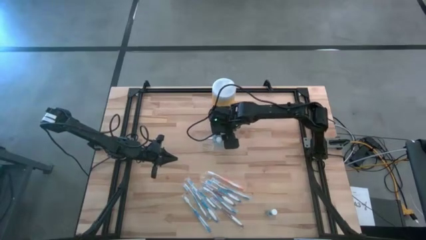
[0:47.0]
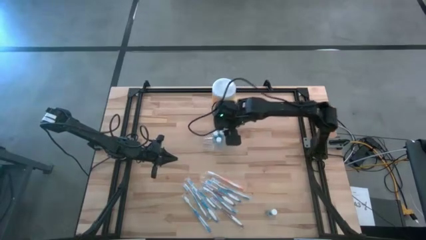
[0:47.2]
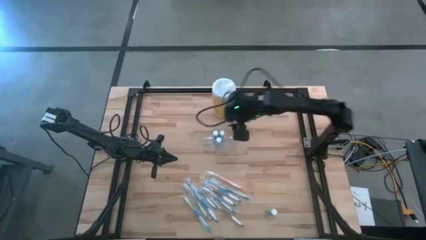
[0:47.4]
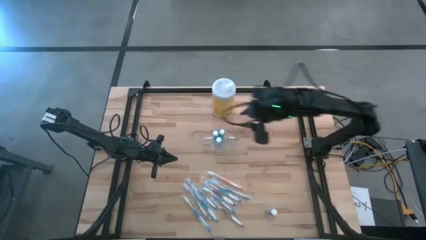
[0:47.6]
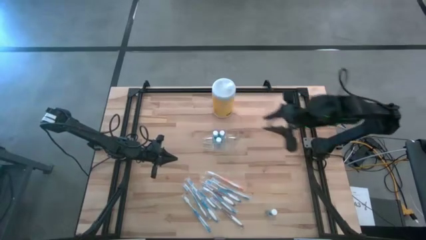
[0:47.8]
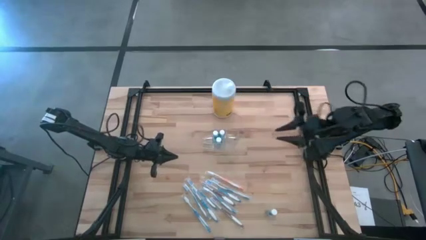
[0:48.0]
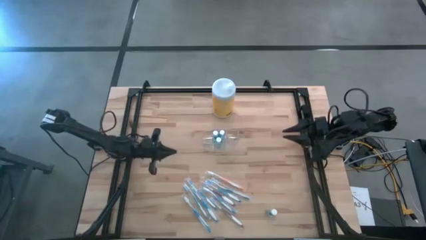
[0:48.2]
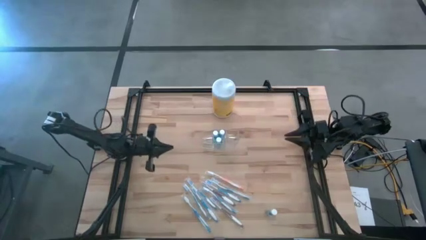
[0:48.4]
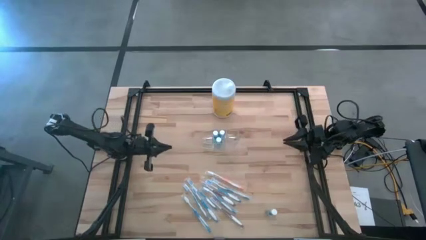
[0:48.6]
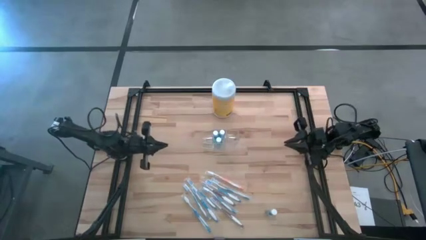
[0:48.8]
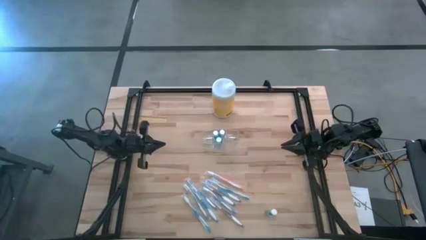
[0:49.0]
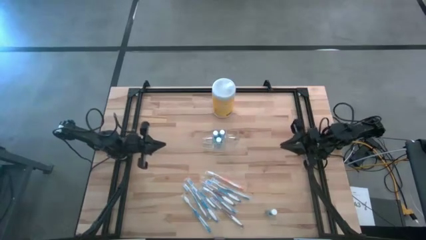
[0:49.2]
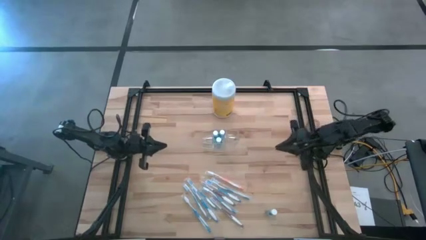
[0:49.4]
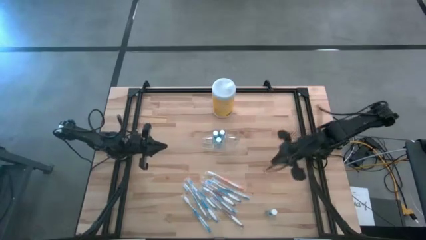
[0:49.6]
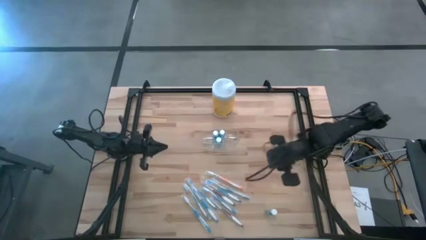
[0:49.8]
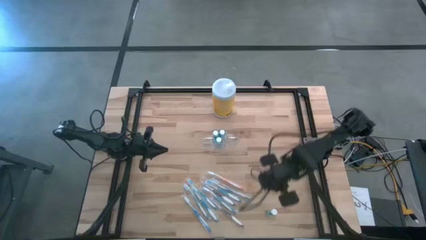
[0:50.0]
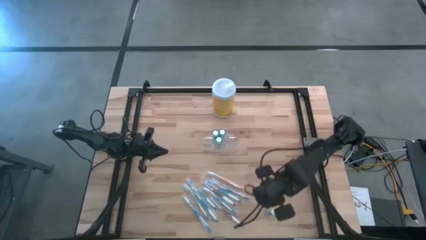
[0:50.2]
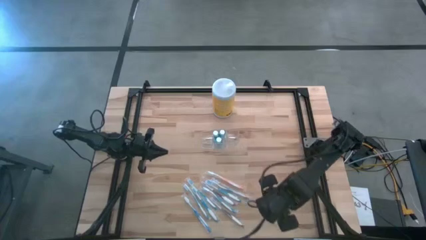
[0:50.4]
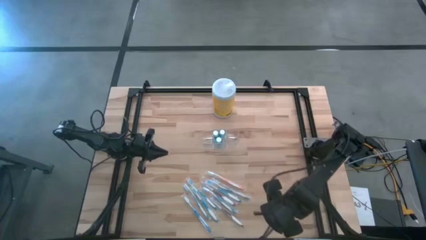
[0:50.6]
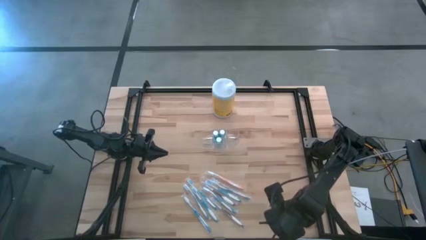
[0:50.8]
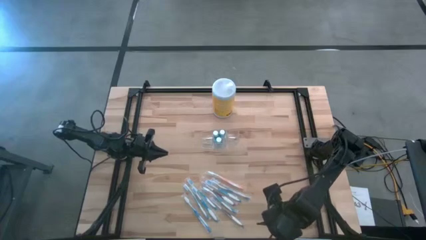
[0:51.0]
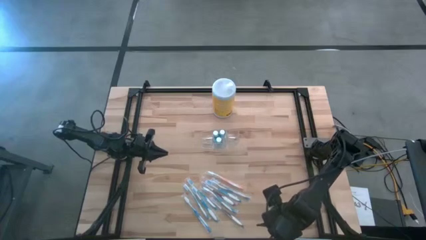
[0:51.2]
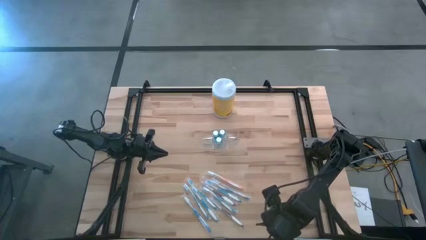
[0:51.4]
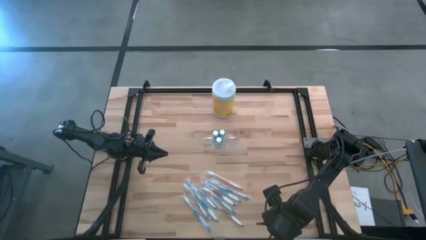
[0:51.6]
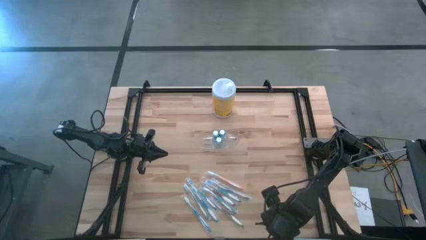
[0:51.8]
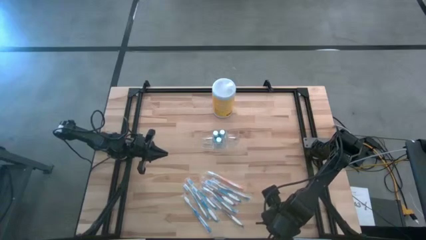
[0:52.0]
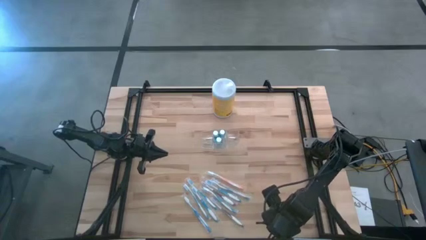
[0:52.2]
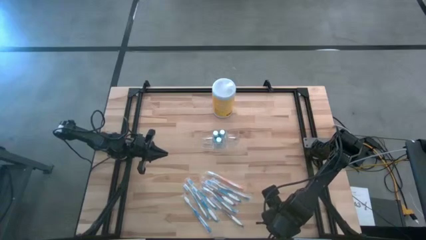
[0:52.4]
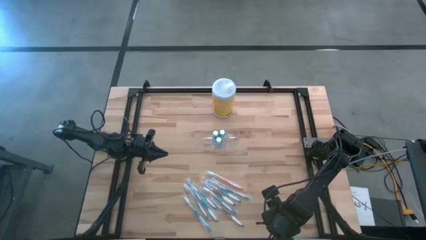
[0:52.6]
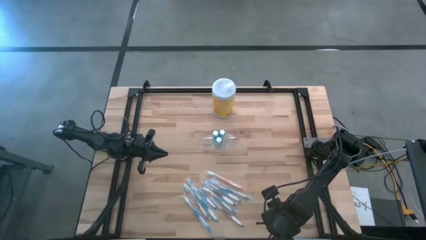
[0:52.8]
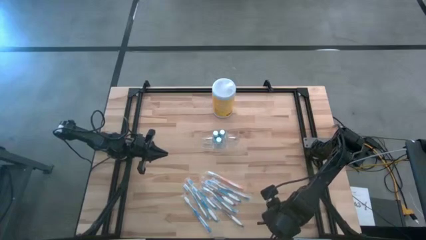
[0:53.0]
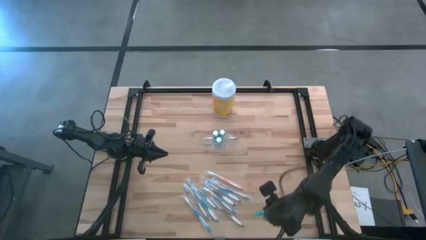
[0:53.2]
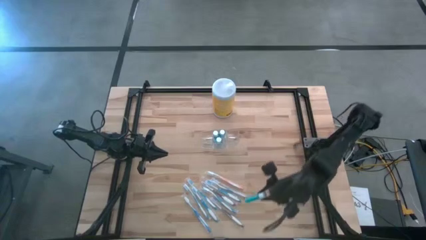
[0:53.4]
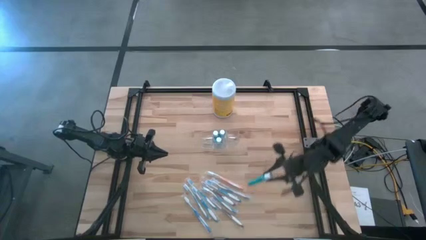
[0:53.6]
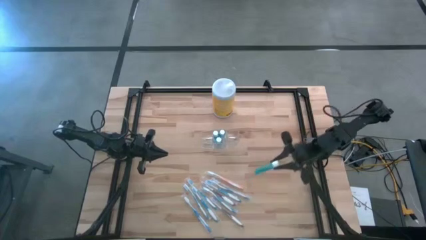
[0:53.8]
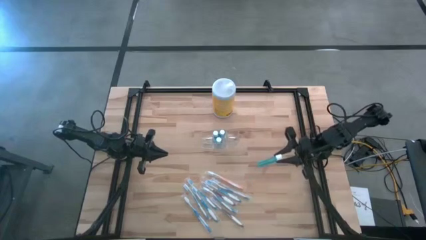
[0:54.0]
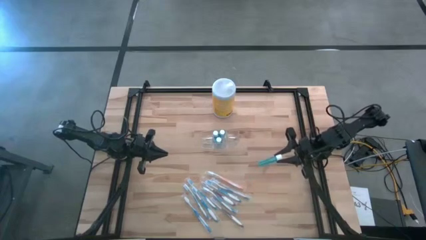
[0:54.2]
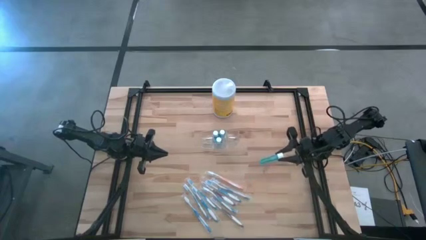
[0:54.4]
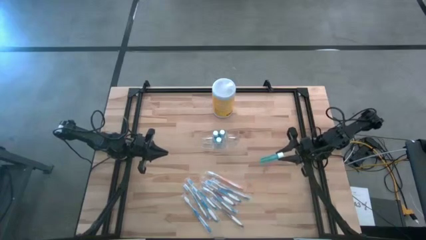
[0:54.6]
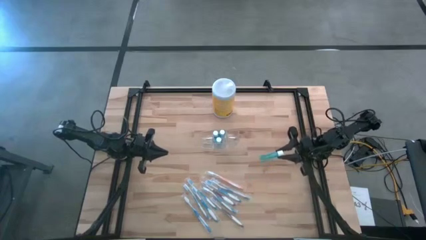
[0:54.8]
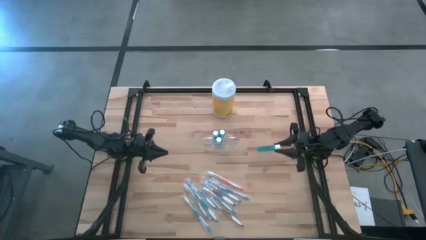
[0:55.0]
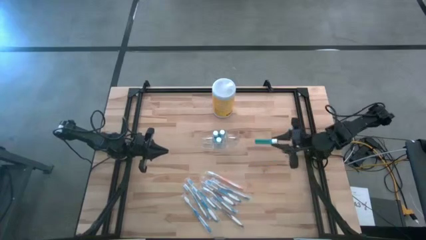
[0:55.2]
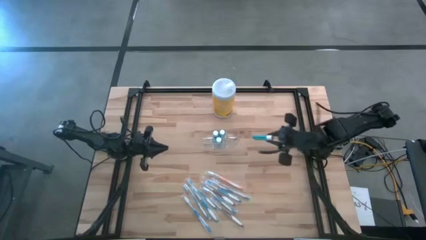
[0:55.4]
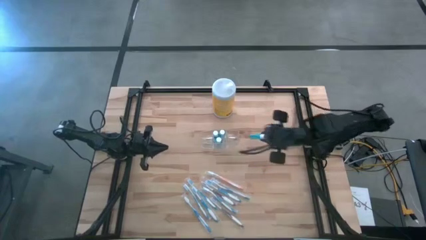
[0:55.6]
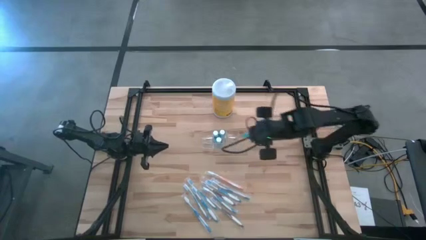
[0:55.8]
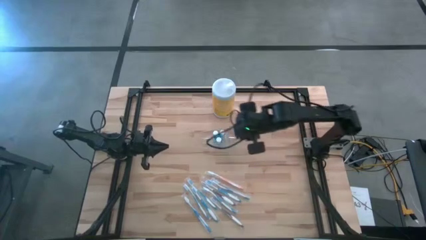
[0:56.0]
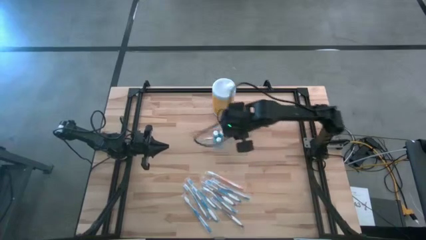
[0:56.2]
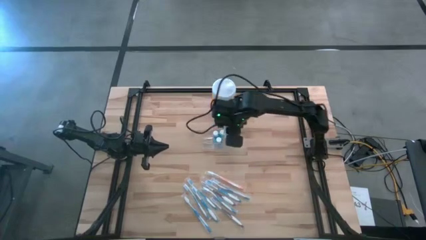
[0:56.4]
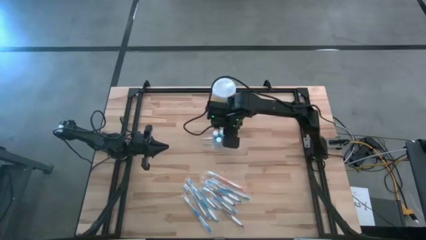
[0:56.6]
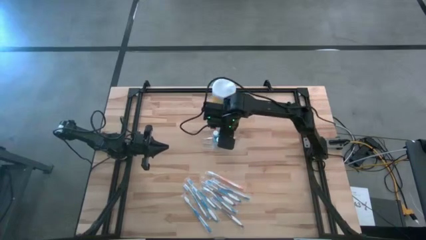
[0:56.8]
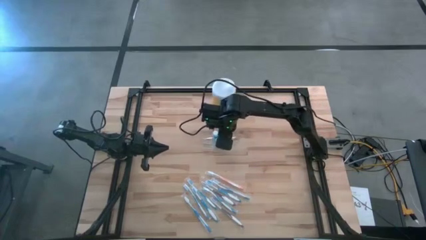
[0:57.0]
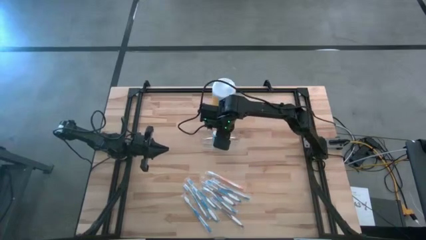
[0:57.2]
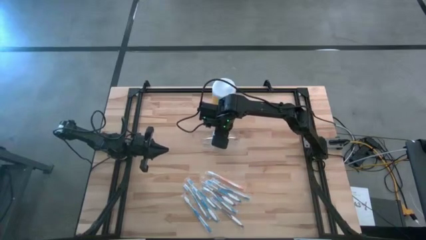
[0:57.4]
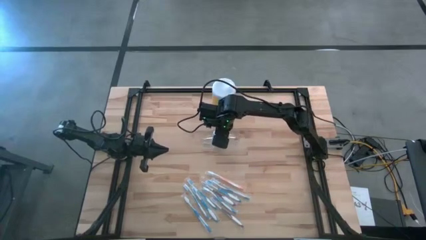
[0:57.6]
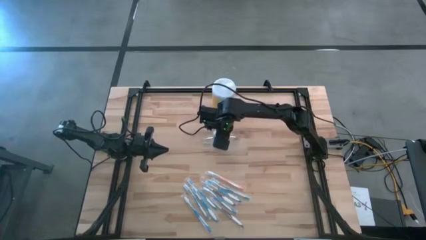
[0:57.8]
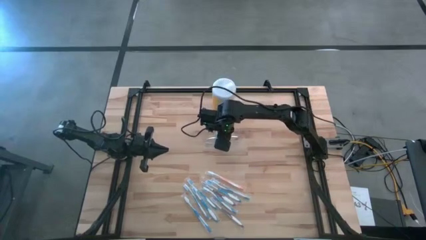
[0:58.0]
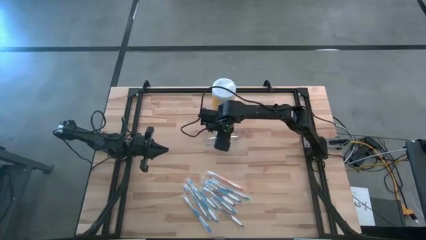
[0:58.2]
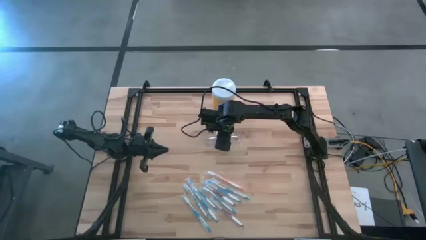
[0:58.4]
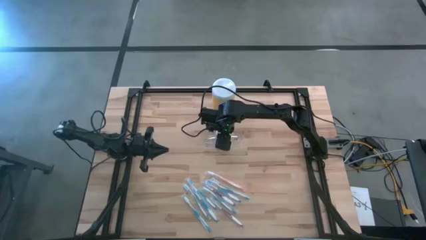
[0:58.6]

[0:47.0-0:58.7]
Task: Pick & Place toothbrushing station
Put the mouthwash into the transparent organizer

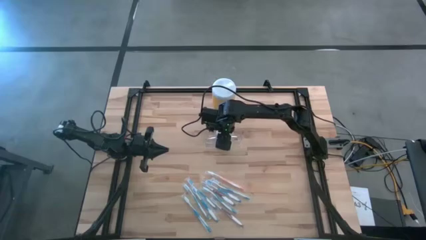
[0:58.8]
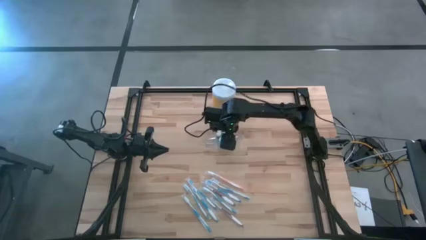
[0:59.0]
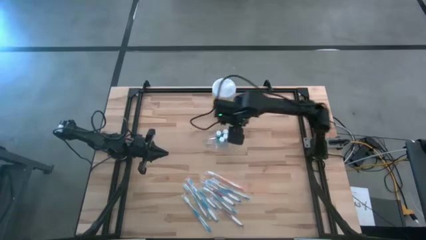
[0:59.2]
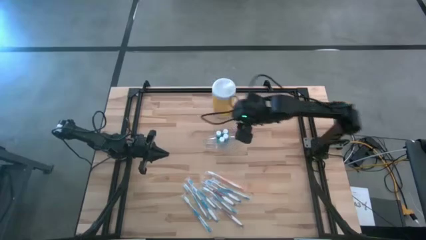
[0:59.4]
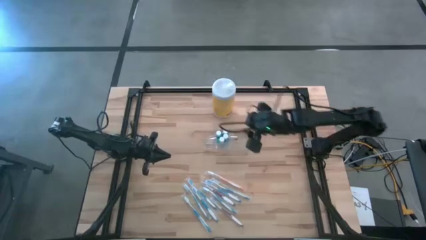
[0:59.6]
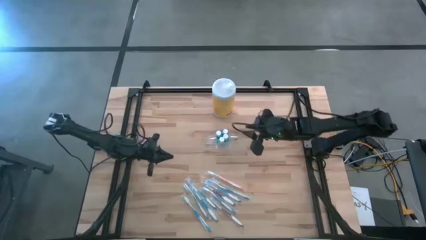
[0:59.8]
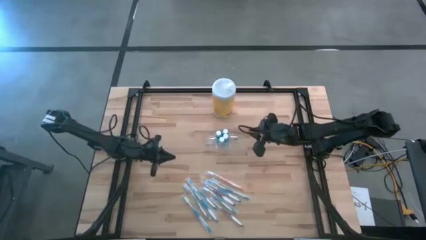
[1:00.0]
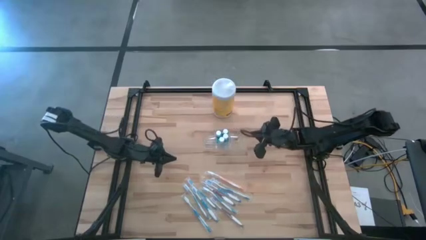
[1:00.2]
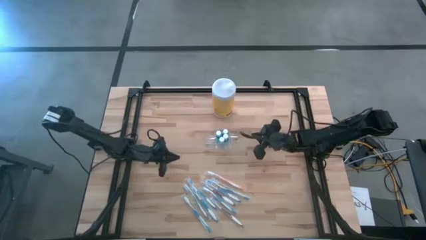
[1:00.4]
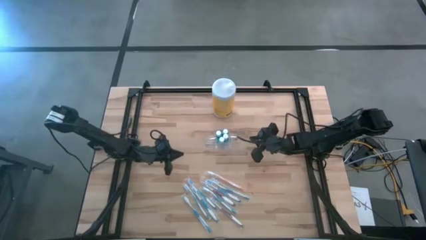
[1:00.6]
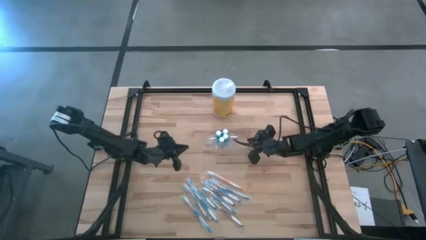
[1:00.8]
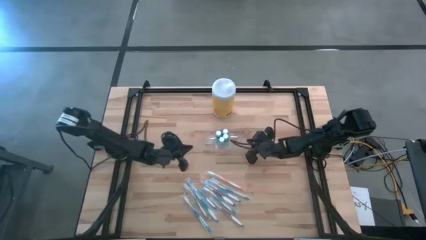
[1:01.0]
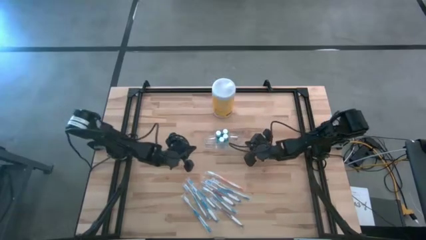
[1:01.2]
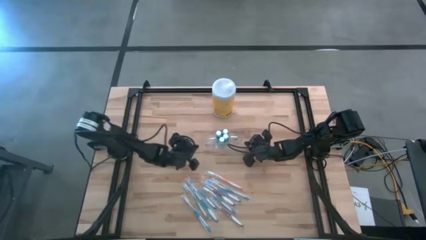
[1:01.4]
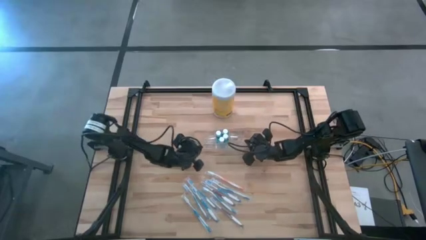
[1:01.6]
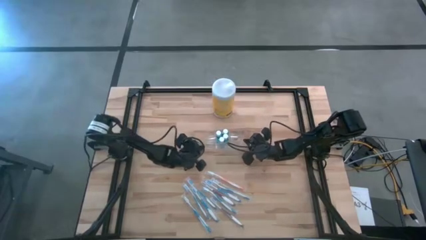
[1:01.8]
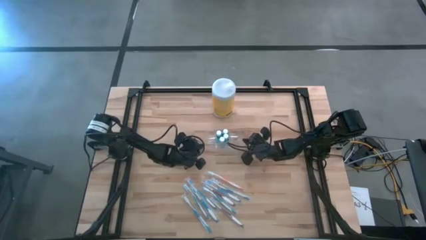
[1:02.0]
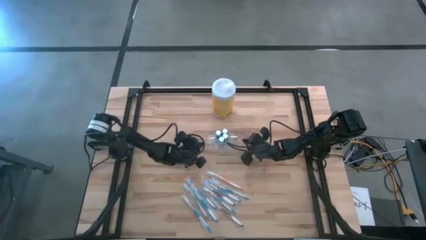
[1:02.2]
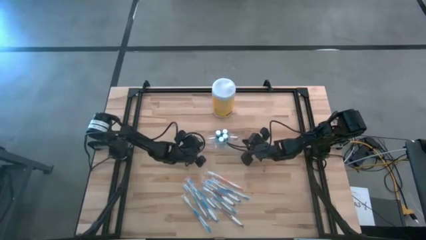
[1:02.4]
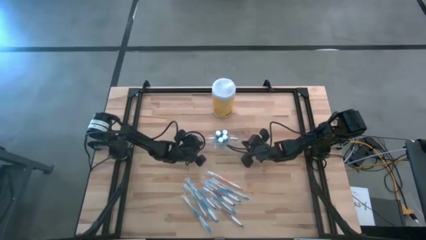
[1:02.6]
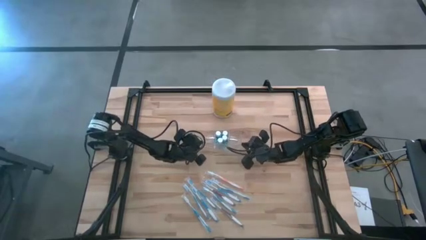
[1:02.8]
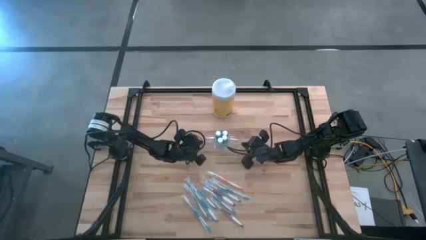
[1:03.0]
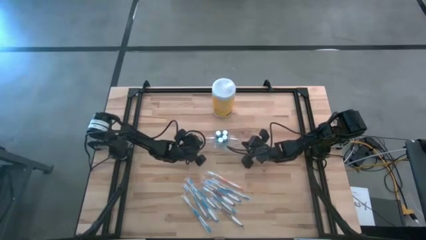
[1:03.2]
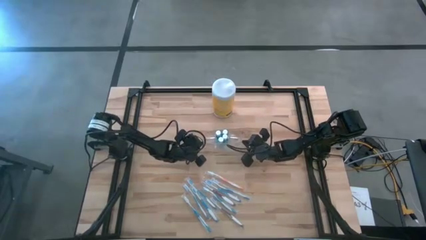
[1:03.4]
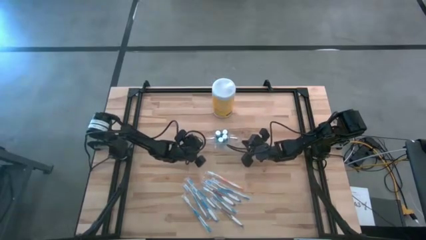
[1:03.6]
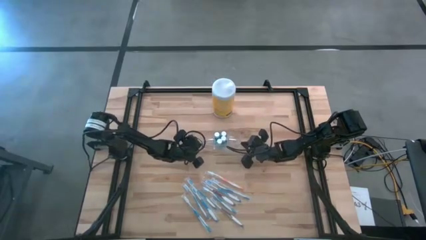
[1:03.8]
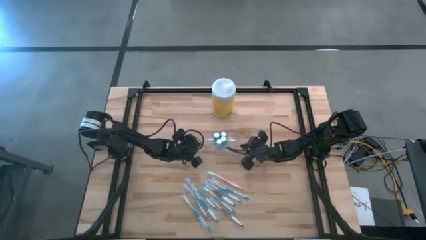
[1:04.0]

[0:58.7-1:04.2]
Adjust the transparent organizer on the table
